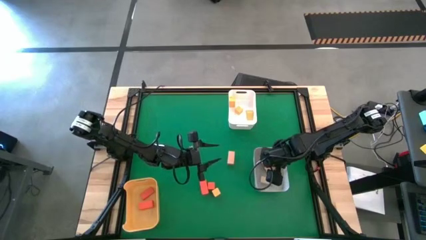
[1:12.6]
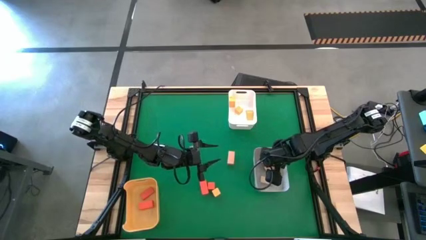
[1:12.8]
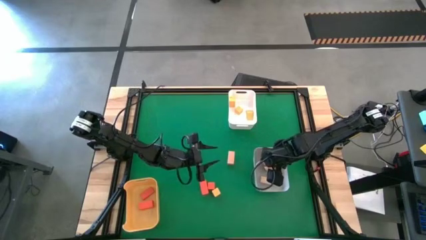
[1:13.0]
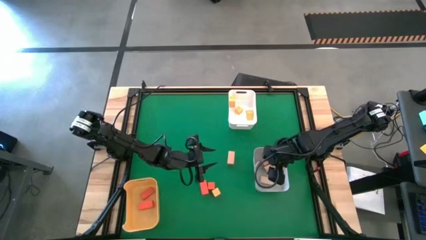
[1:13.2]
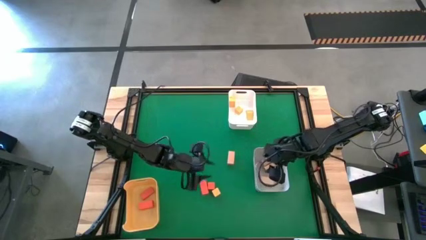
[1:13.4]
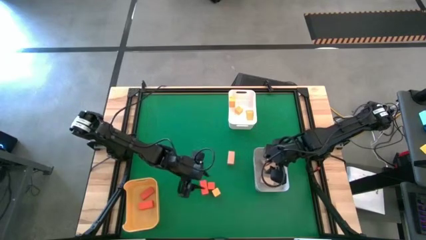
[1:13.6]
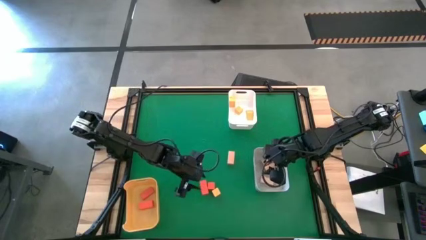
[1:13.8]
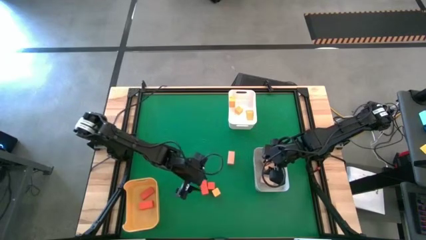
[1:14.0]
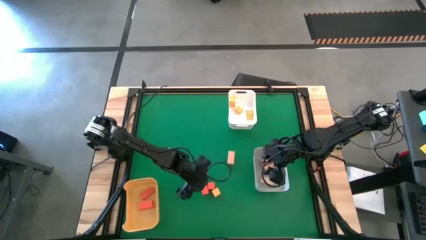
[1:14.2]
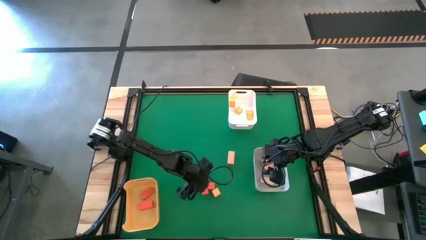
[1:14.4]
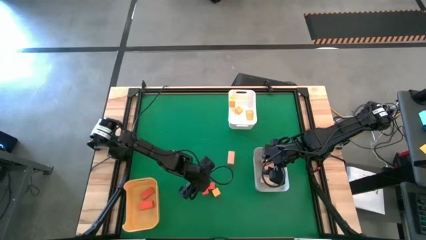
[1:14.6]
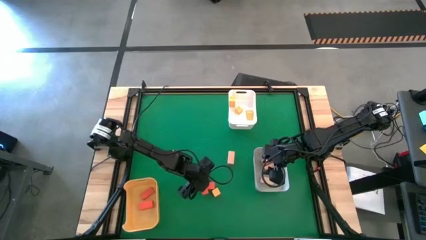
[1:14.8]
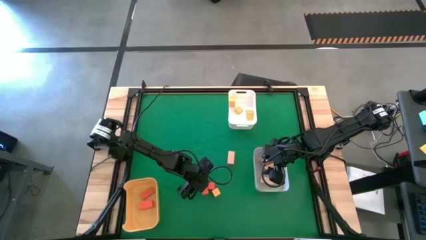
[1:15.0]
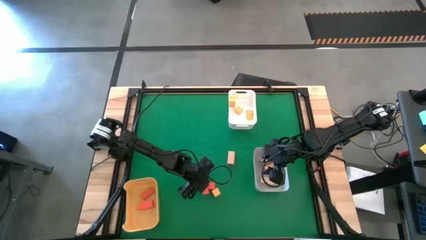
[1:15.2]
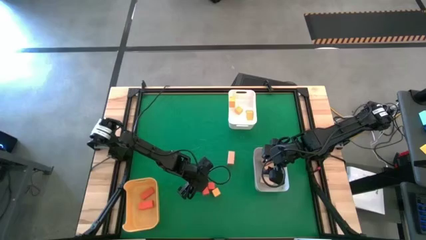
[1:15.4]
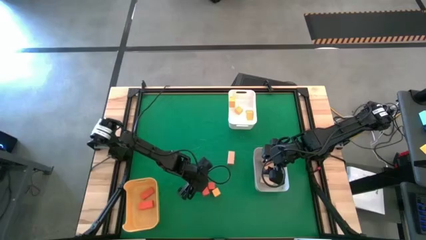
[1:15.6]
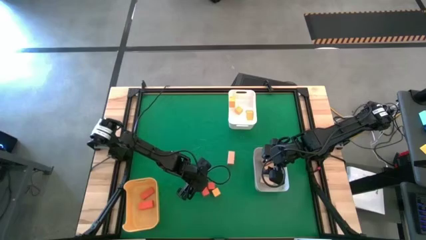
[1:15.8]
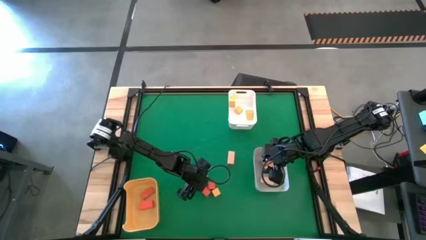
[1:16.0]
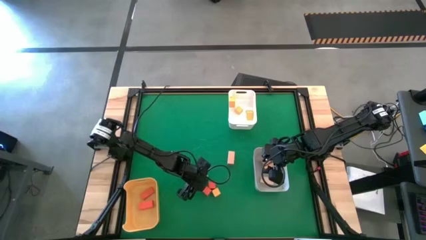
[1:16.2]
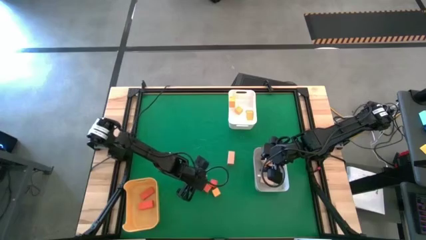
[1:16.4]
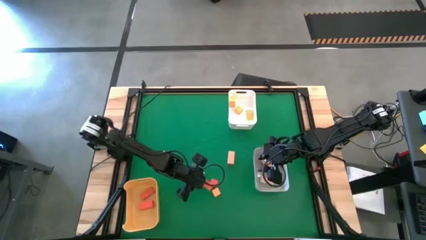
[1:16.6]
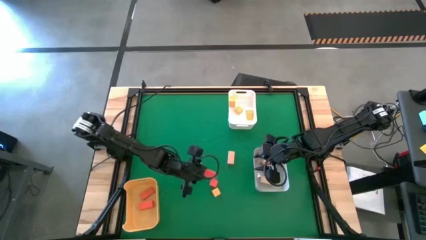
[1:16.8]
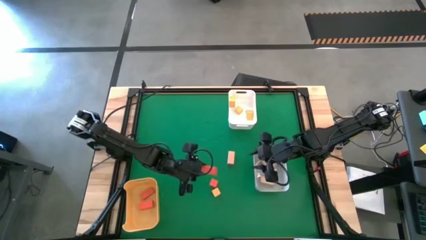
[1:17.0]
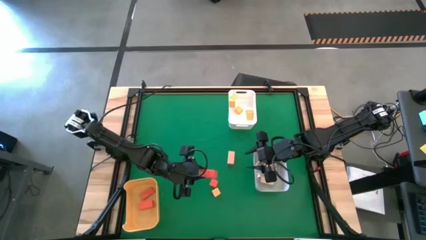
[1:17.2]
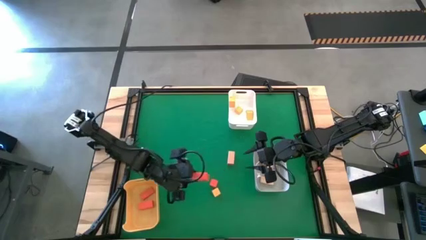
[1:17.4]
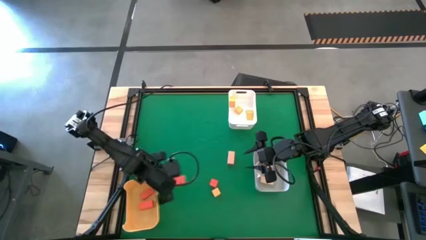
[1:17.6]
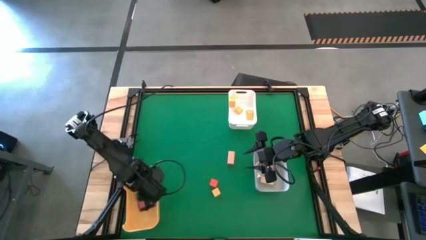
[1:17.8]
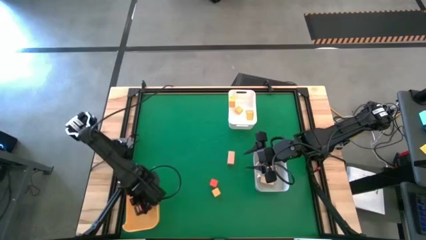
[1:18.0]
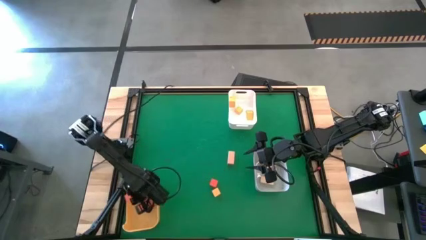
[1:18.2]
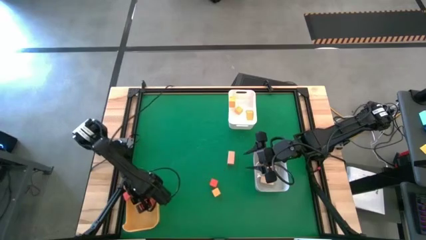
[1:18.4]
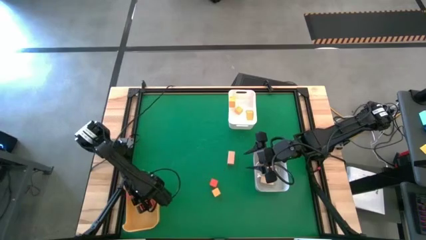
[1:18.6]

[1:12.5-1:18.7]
Task: Sort & place blocks by color
Put the orange block into the yellow bin

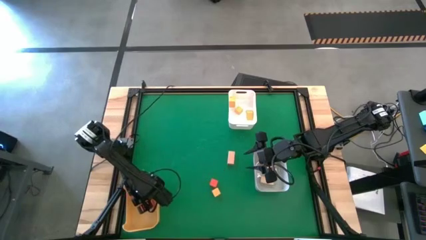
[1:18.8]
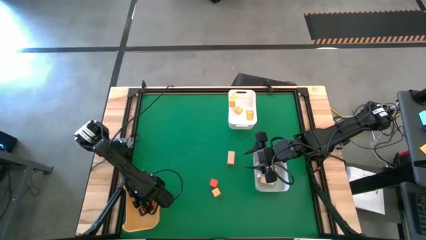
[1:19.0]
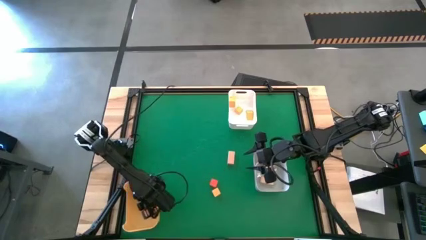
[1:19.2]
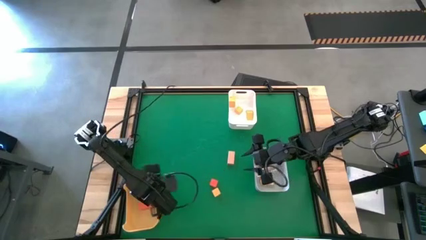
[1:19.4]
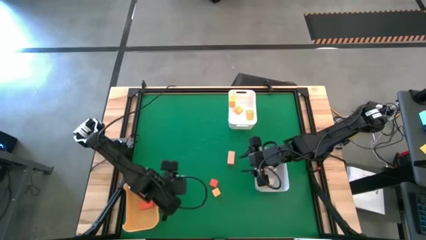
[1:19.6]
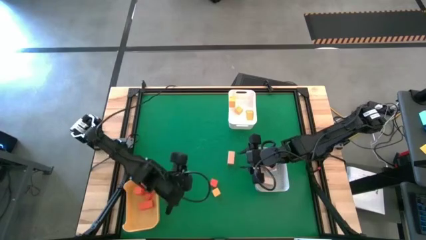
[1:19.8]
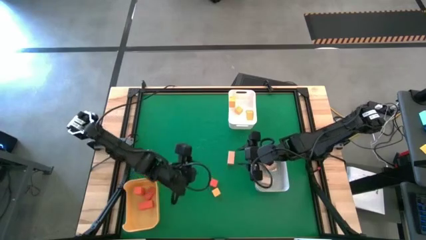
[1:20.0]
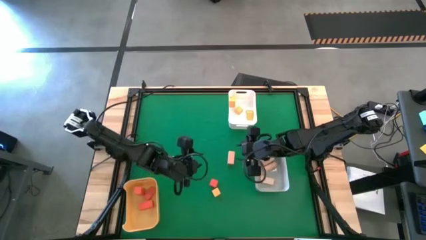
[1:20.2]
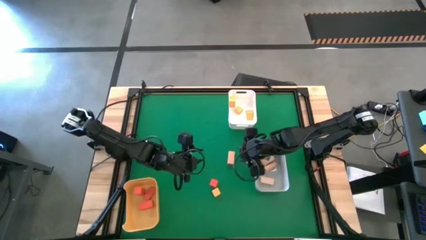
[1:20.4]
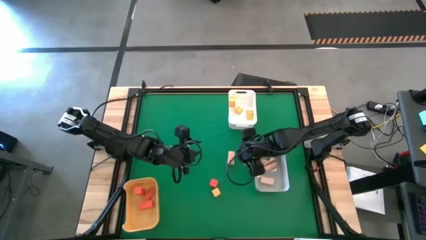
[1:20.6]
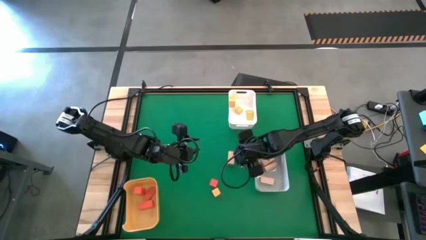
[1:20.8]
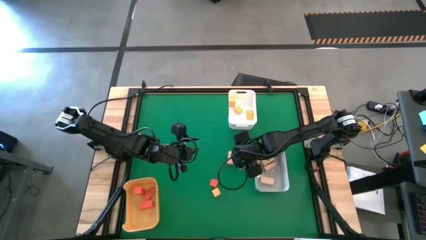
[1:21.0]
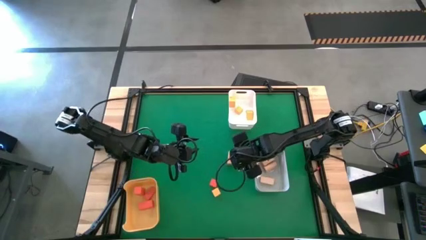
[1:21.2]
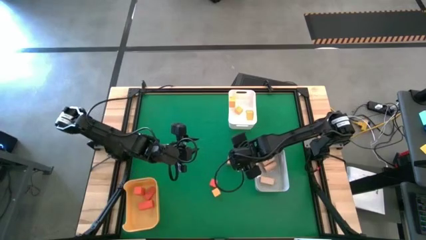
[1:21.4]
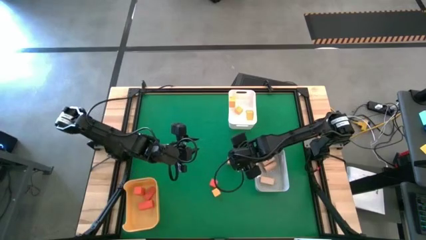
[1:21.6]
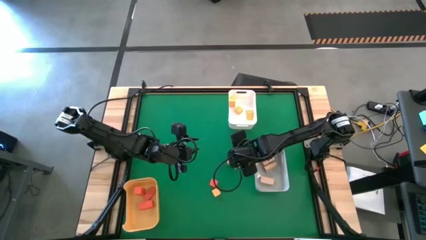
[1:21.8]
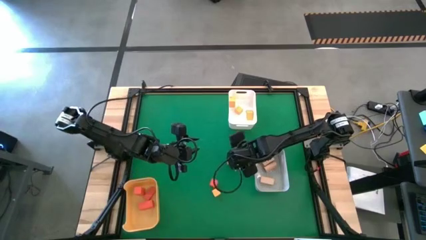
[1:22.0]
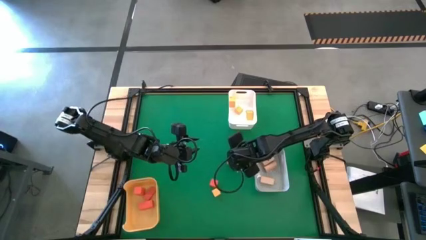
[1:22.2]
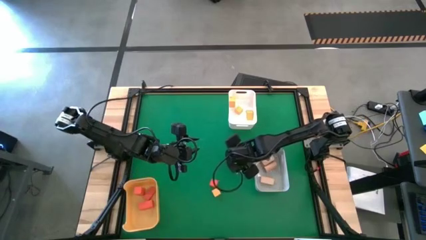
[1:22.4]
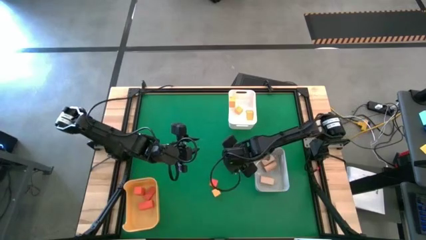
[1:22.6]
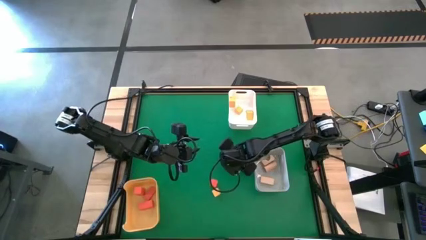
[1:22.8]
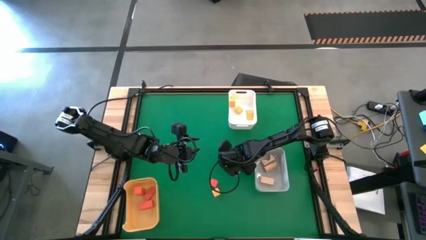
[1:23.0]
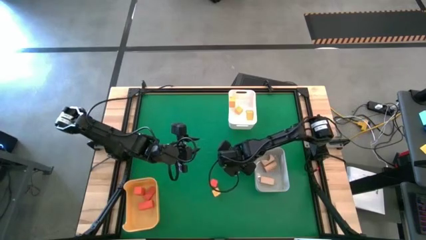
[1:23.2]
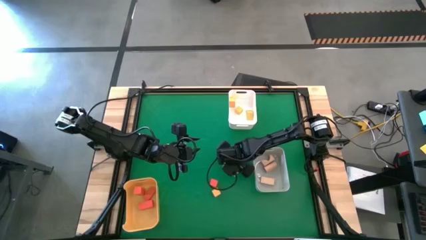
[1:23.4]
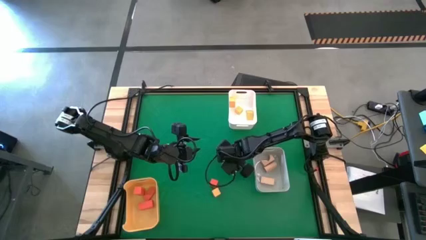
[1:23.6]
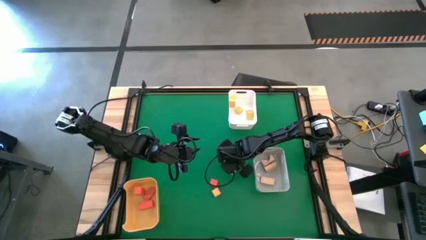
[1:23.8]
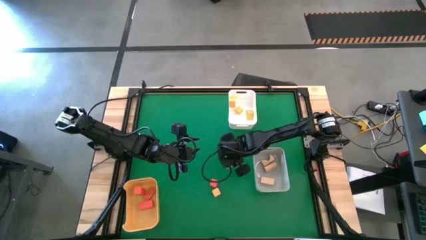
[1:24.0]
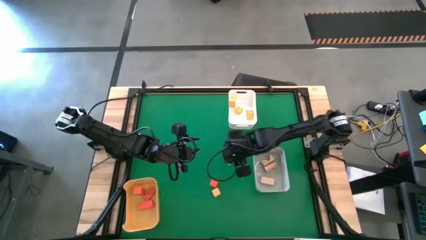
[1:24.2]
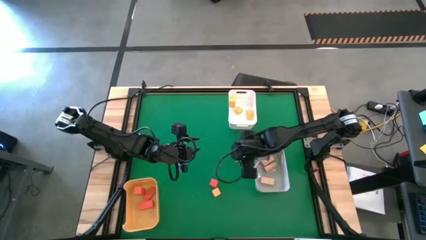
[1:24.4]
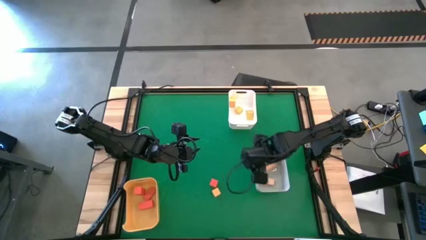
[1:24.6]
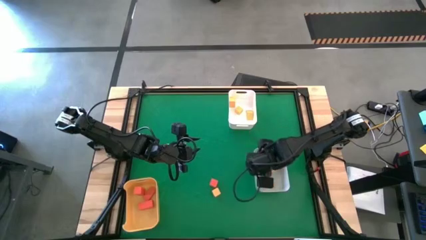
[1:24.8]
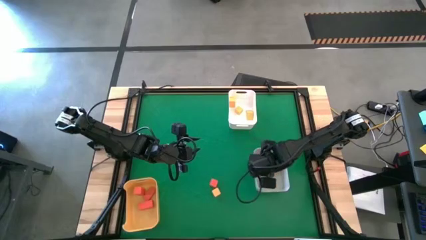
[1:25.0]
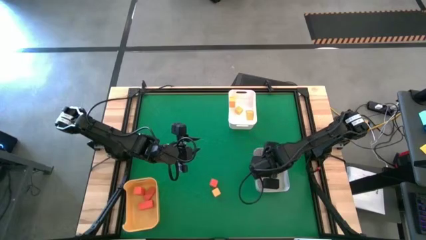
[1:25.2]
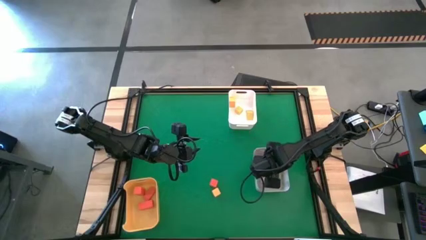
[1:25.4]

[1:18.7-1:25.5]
Put the brown block into the gray bin

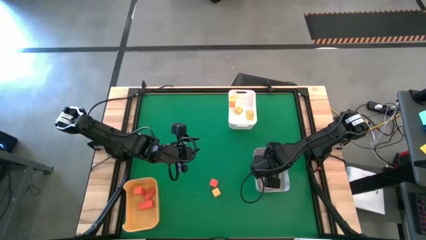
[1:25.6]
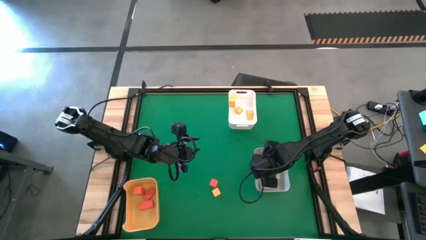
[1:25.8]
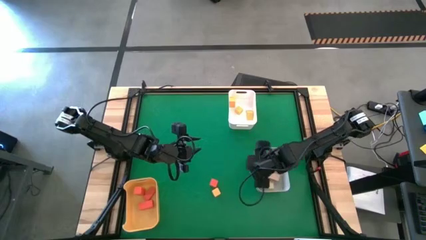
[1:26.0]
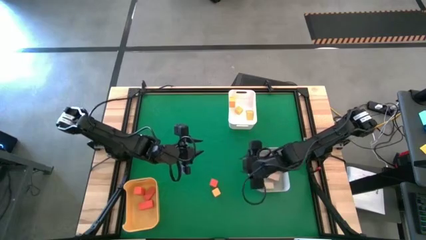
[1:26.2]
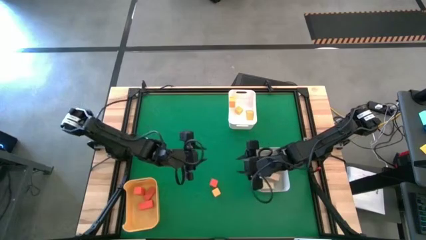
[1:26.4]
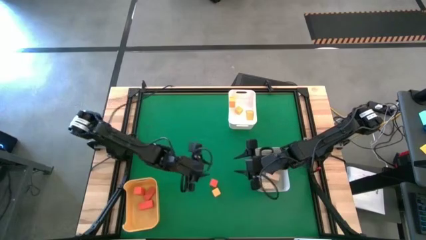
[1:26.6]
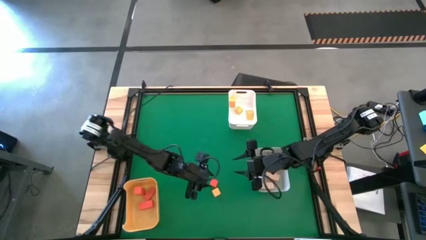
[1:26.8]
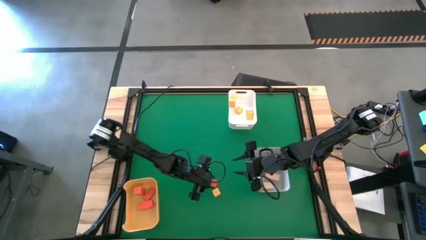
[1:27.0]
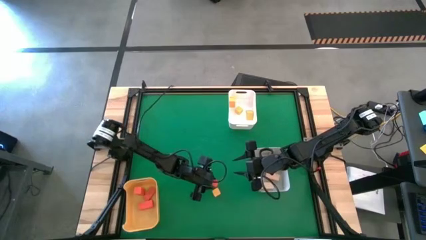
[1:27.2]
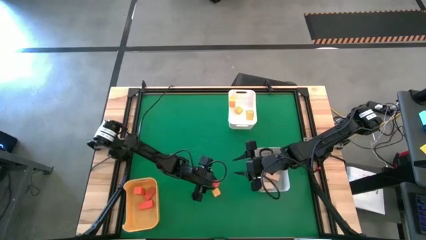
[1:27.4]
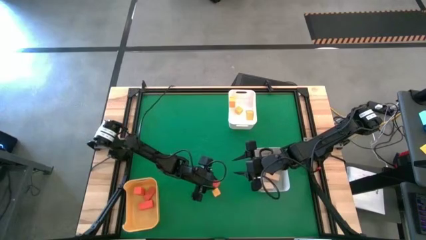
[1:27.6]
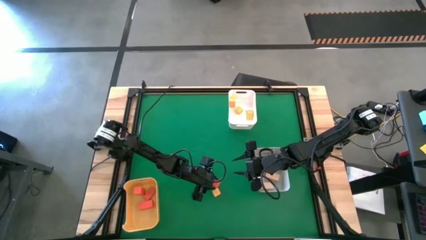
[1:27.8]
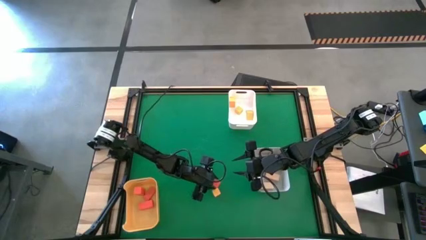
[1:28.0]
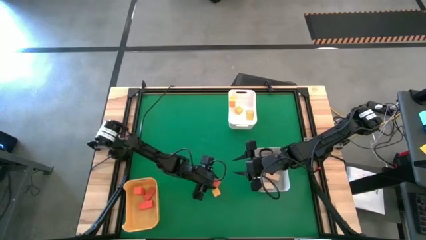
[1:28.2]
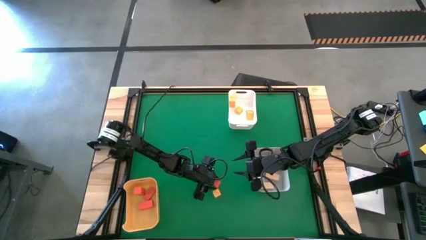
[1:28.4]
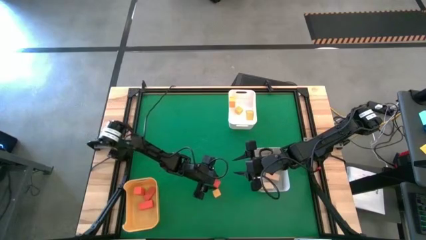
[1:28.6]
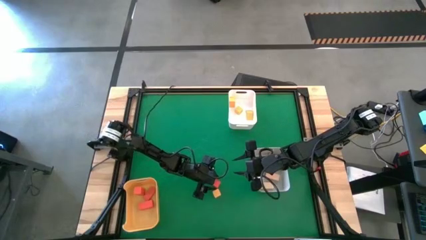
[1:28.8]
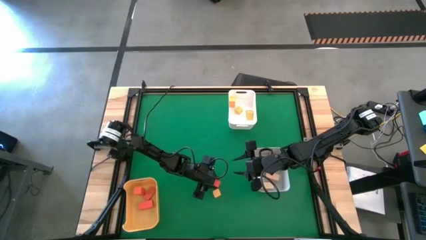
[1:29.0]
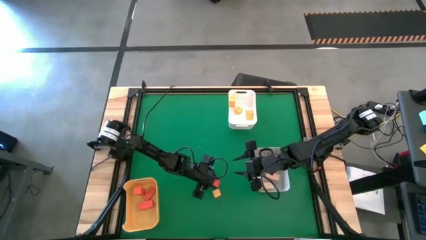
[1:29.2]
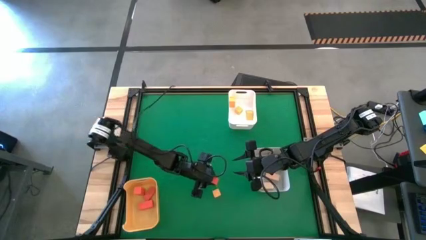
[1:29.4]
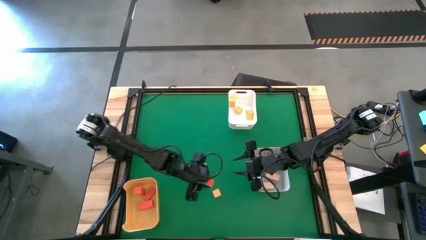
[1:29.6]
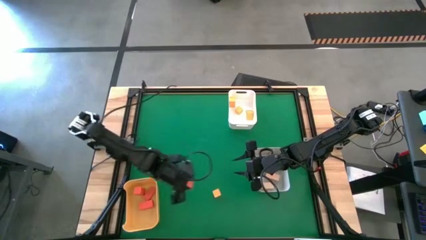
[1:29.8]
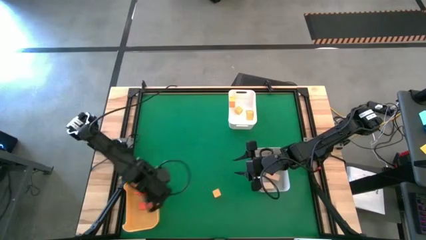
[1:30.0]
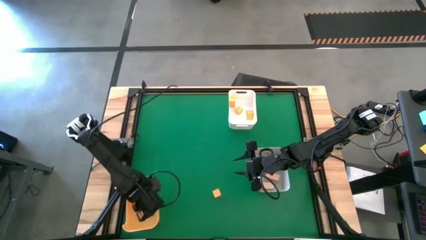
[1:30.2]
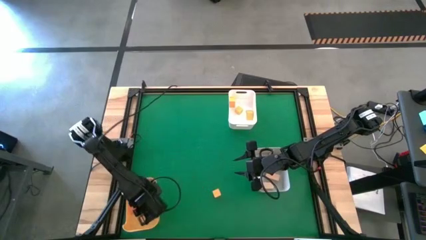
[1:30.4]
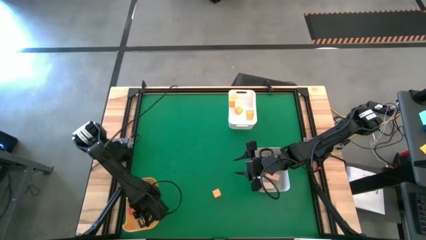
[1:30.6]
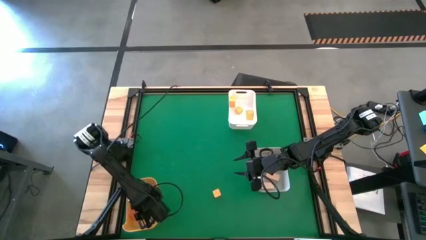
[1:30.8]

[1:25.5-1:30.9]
Put the orange block into the yellow bin
